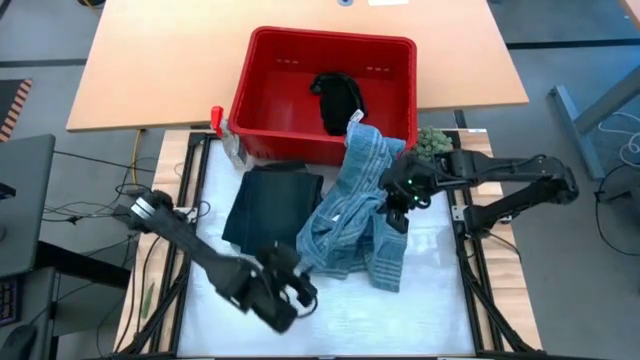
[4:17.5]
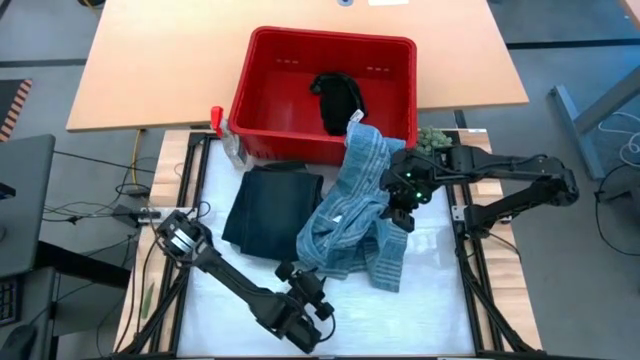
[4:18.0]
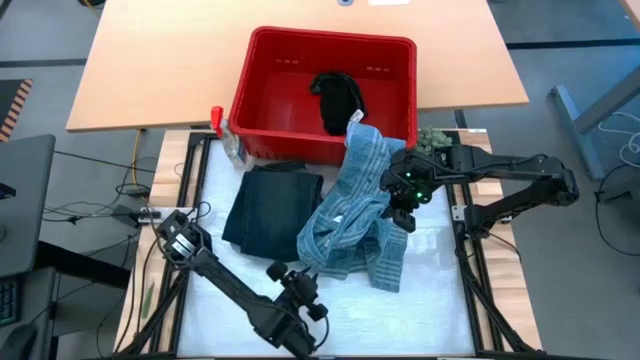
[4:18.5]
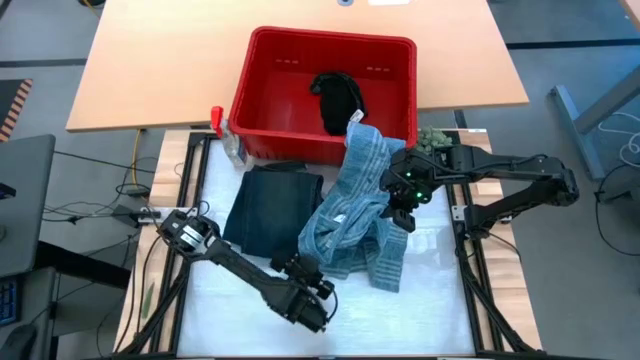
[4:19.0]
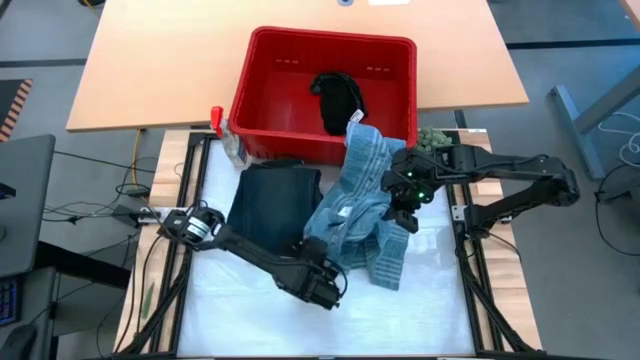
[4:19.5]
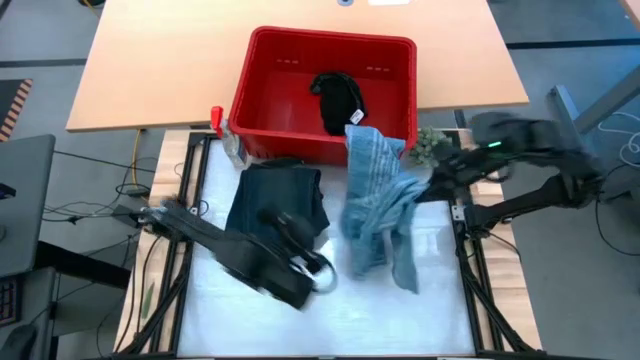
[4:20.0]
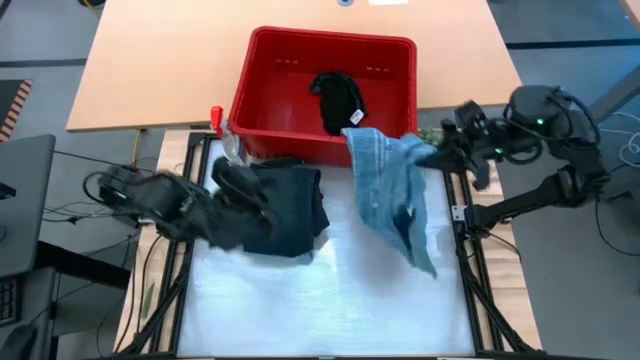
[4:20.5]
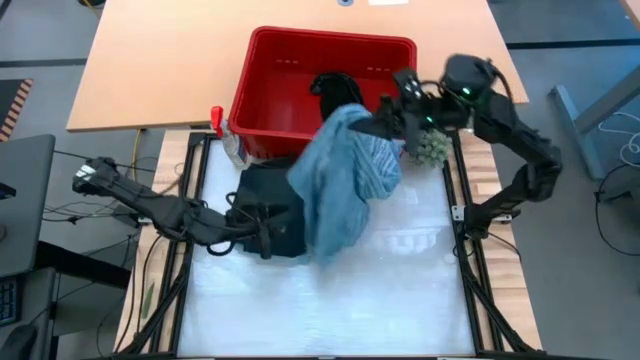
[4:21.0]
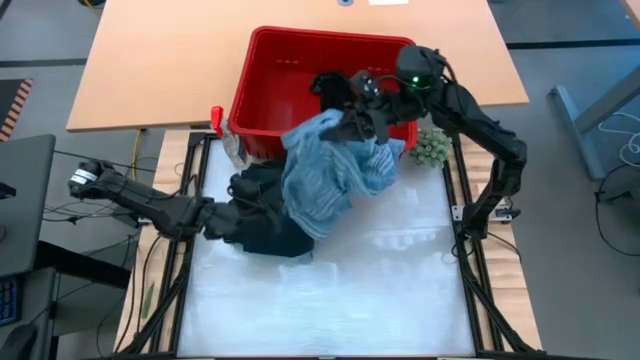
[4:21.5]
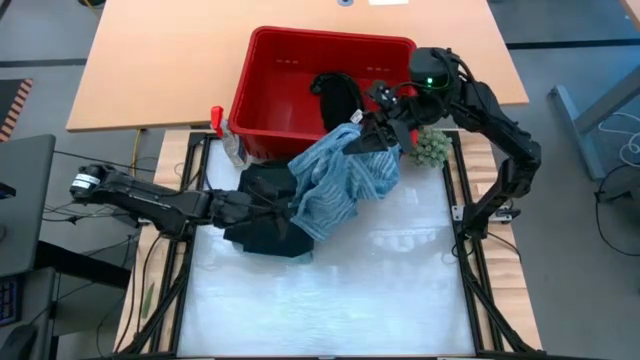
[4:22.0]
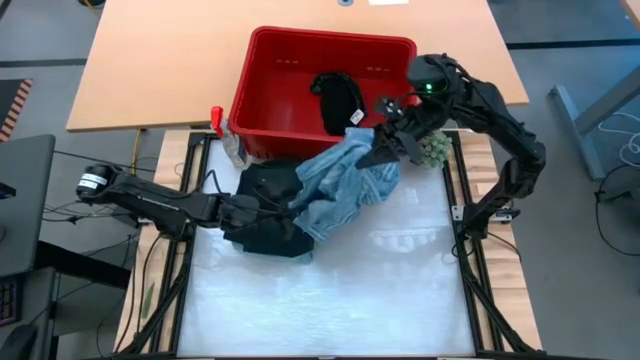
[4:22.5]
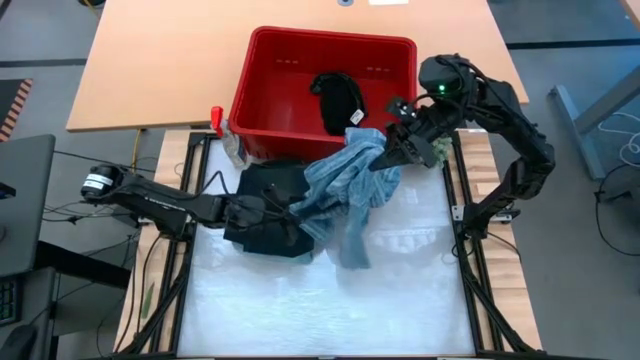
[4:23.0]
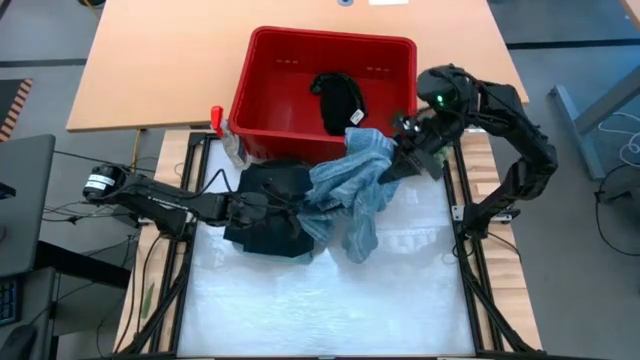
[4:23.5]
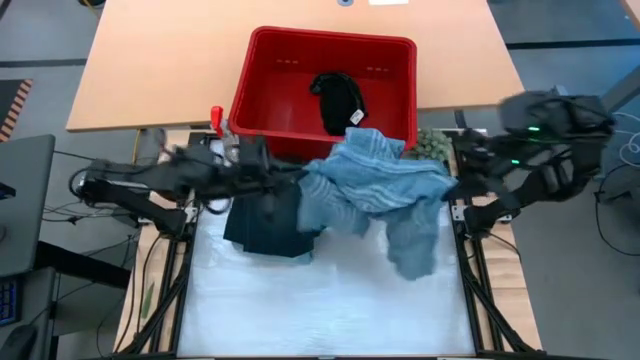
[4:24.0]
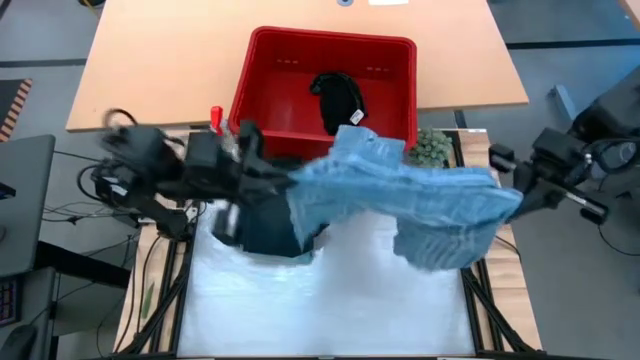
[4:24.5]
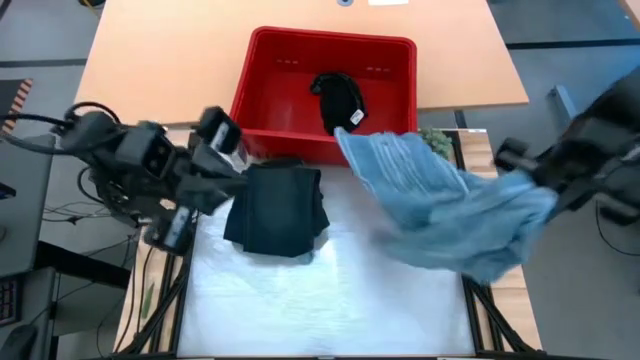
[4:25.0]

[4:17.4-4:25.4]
Task: Fold laundry
Fold the blue shirt from the red laundry bin

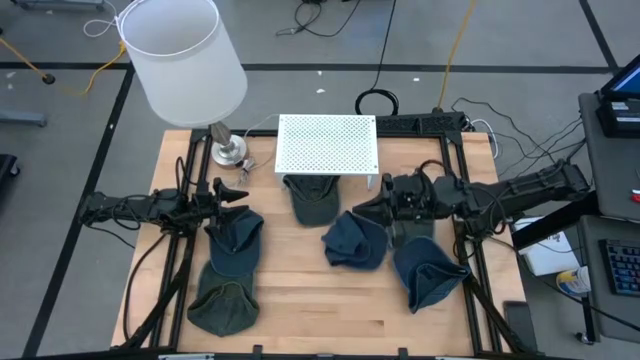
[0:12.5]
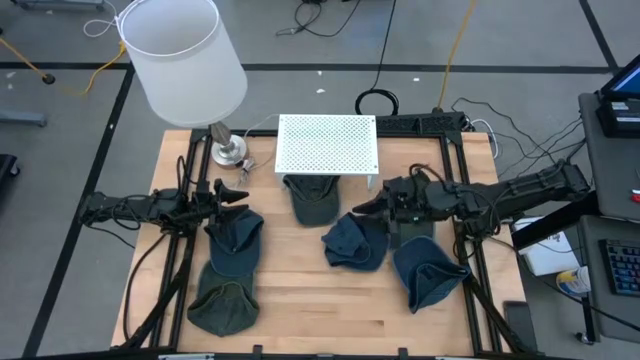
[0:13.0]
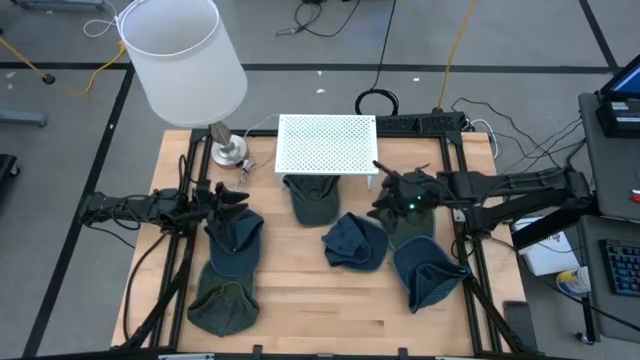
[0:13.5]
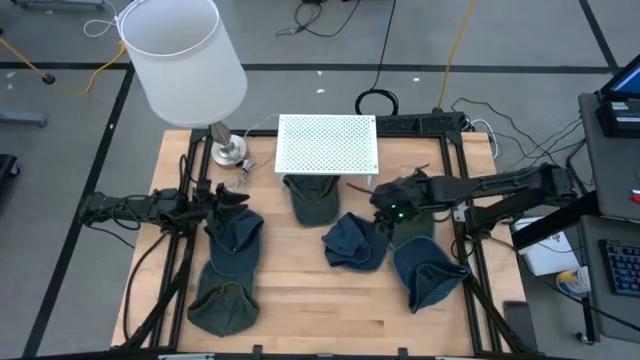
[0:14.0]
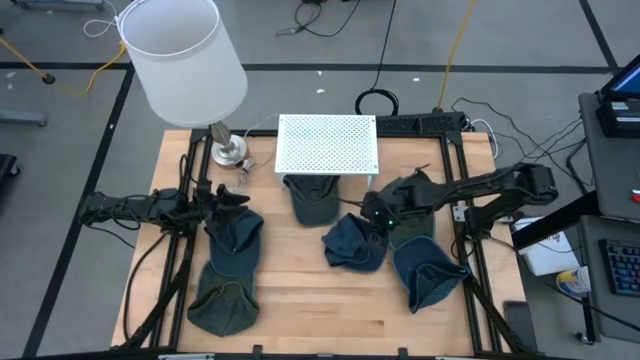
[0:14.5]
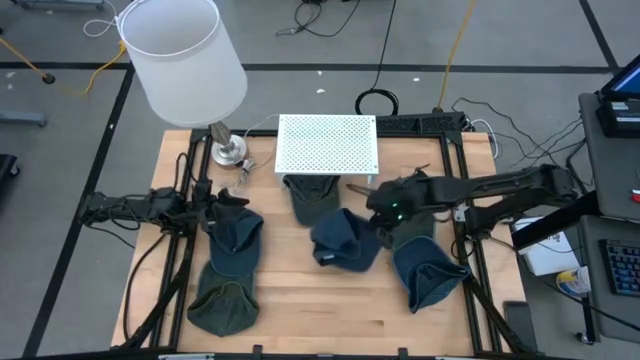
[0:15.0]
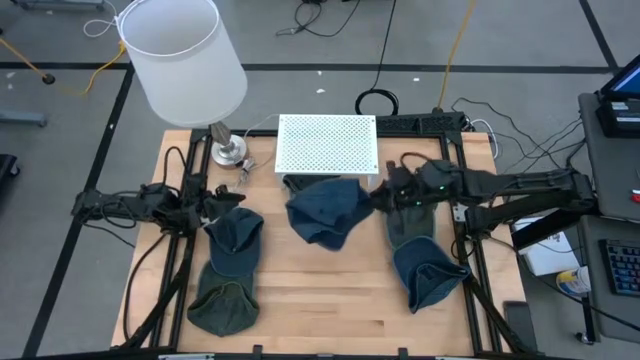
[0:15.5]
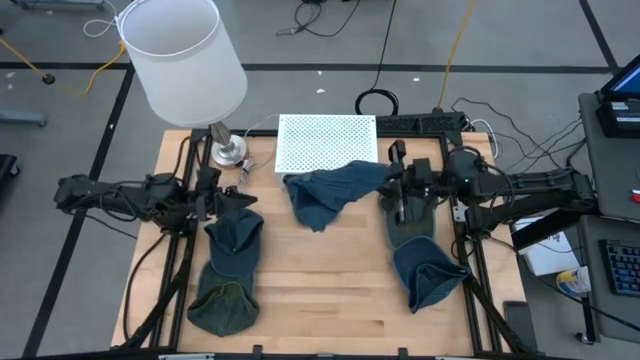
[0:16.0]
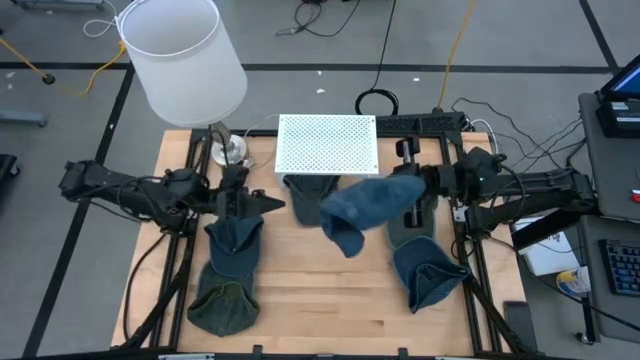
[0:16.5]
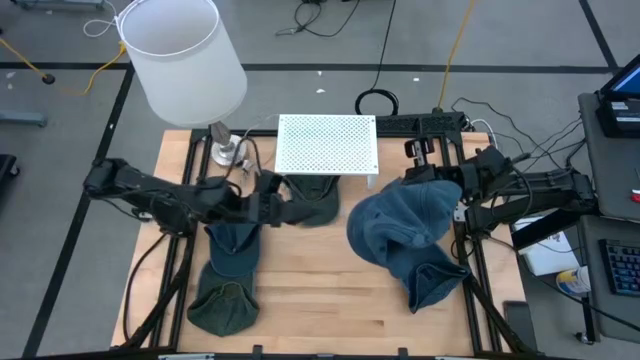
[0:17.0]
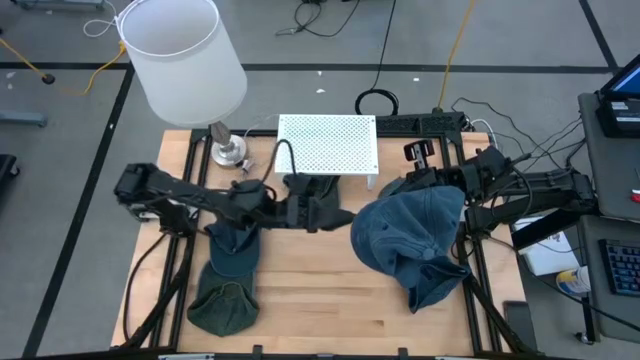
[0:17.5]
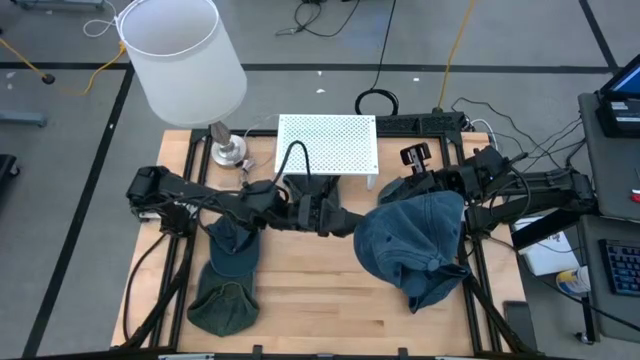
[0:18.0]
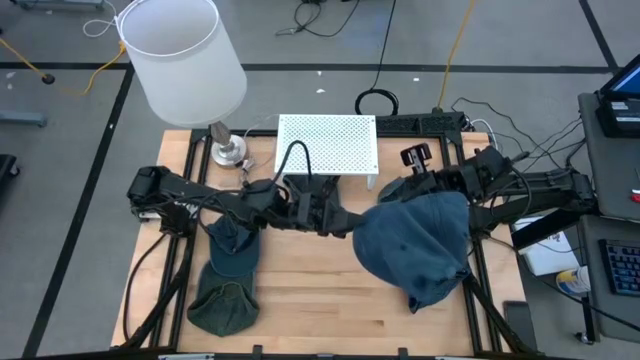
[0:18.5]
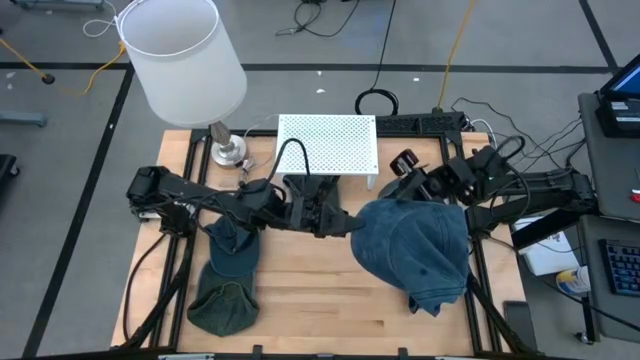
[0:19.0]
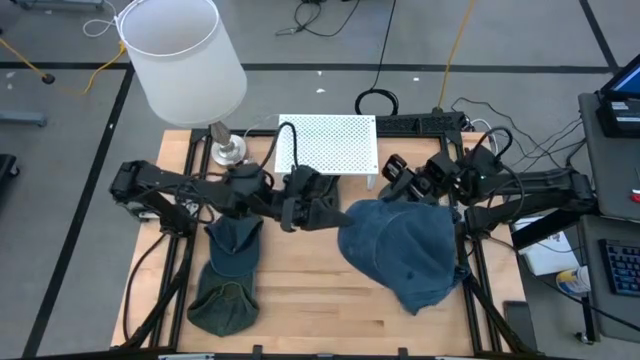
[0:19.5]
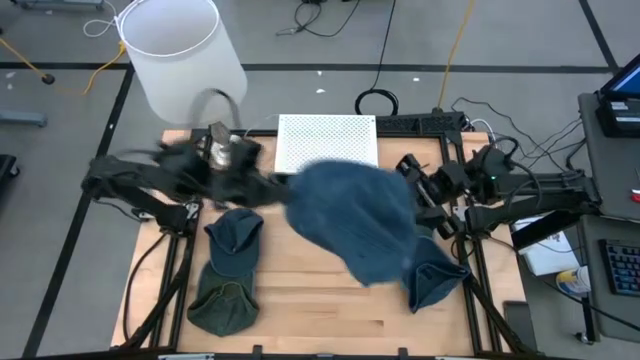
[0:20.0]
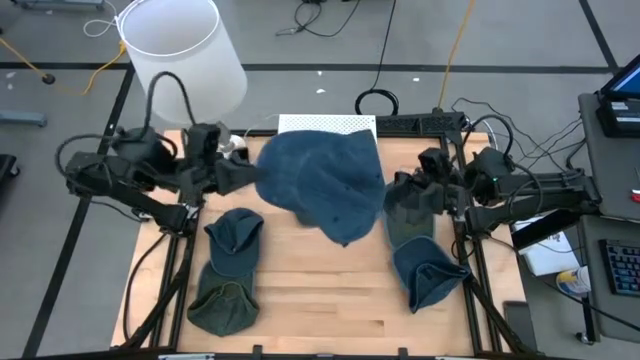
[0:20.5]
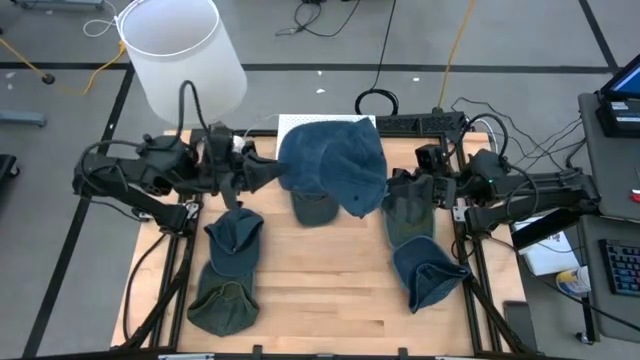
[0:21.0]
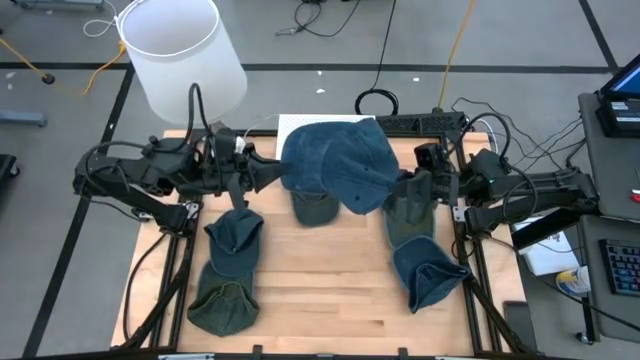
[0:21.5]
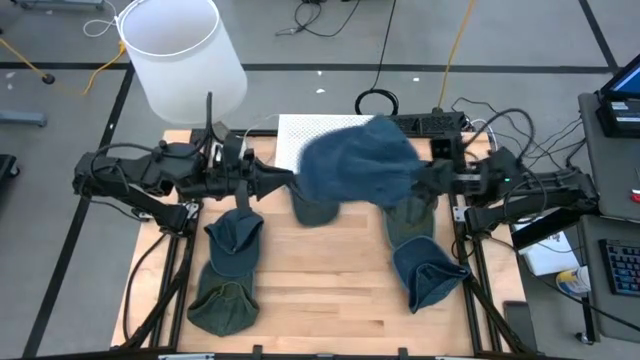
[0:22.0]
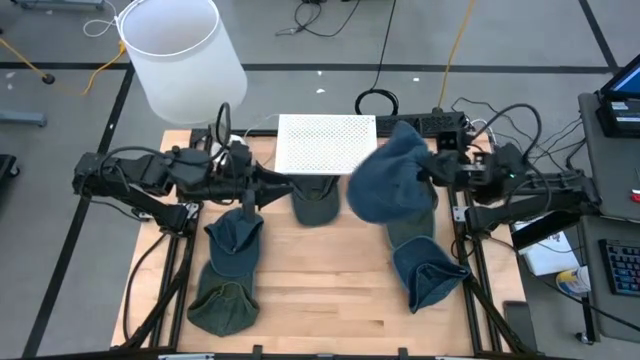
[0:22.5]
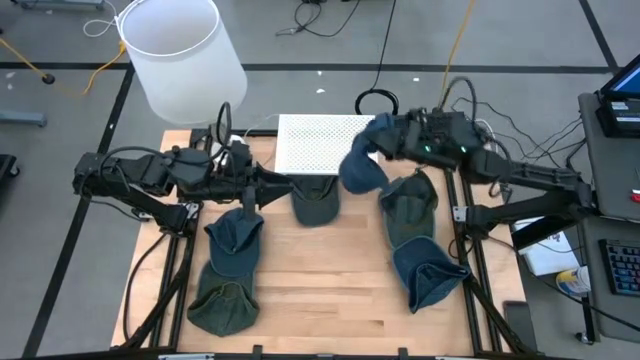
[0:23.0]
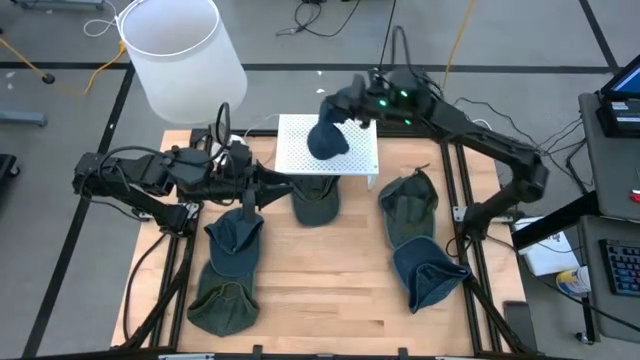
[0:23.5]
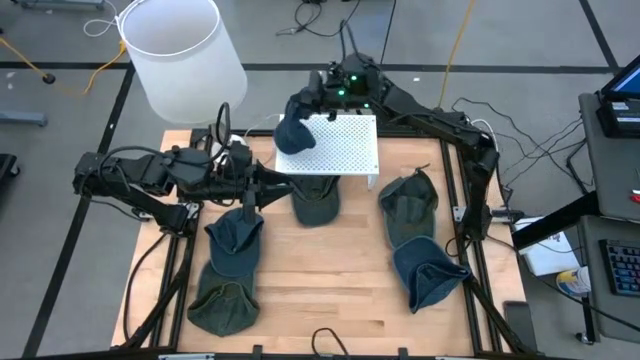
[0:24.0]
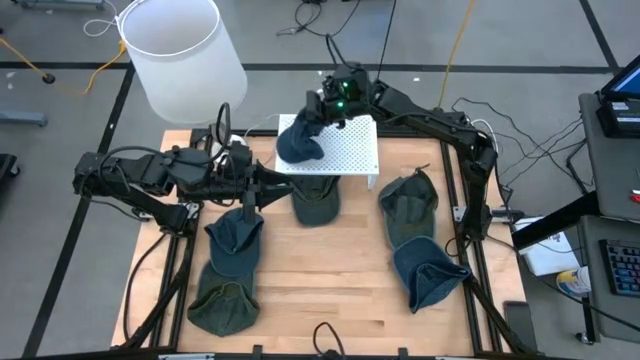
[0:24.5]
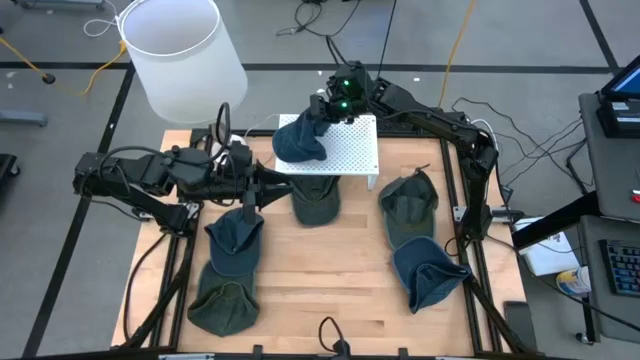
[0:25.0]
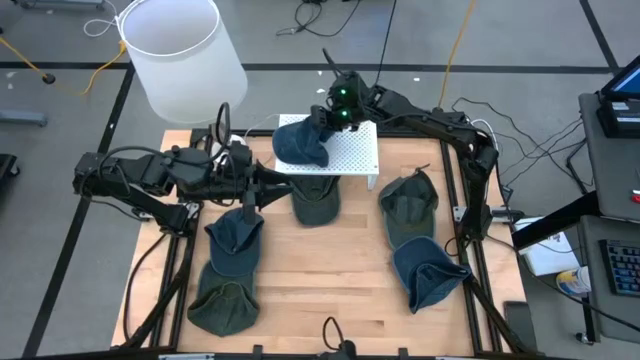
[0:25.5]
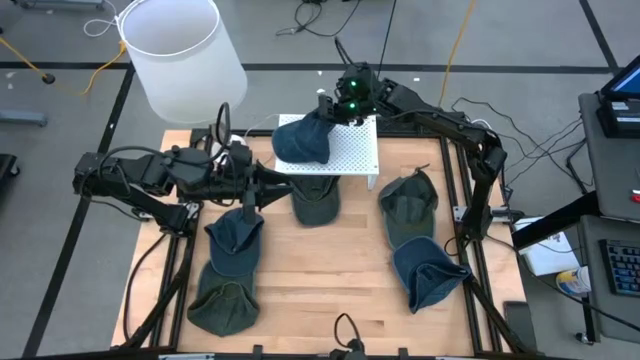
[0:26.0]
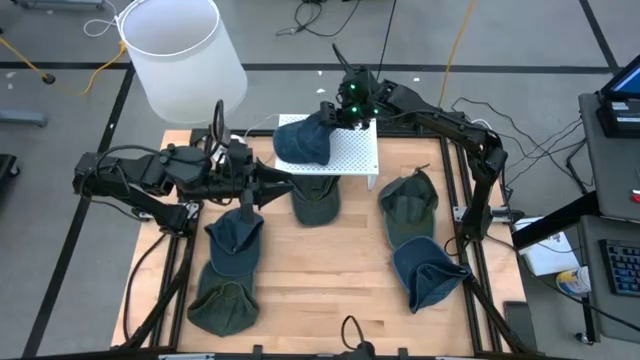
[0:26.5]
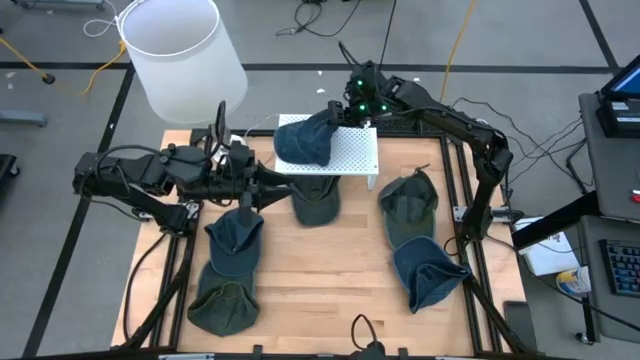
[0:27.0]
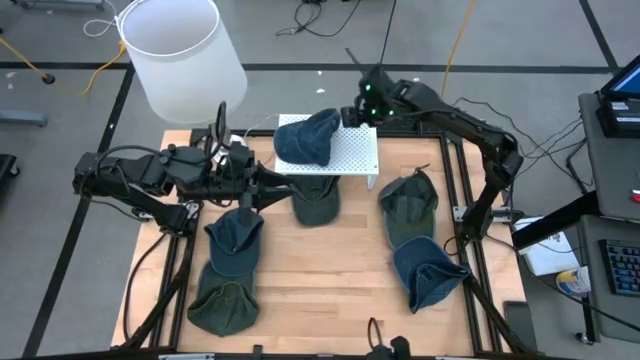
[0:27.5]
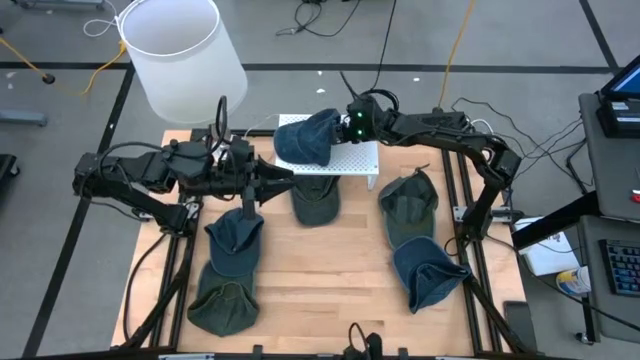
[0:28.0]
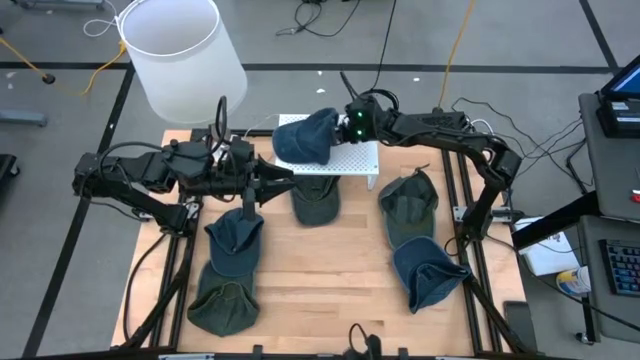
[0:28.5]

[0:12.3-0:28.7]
Task: Pick & Place hat
Put the middle blue cap on the shelf
